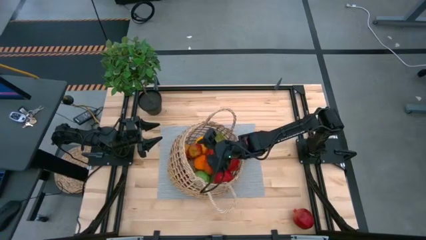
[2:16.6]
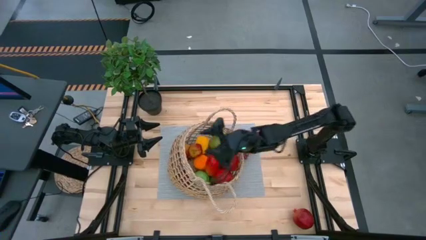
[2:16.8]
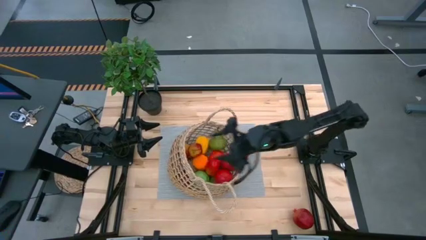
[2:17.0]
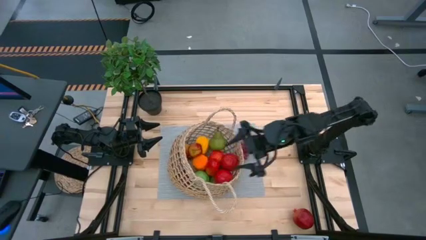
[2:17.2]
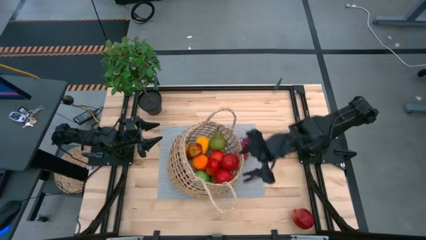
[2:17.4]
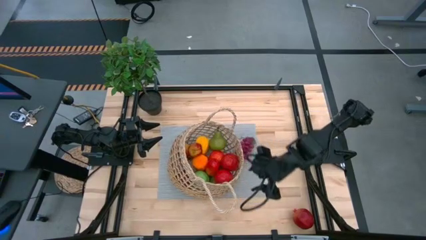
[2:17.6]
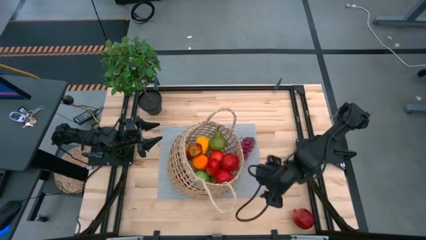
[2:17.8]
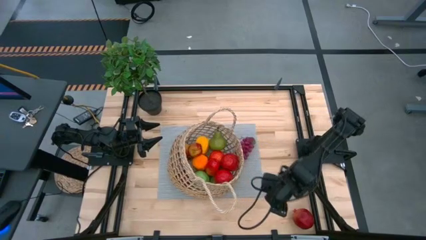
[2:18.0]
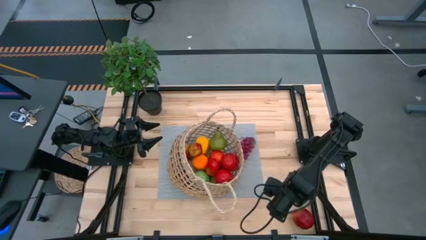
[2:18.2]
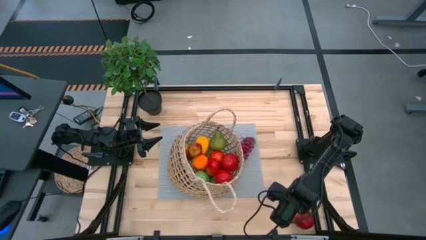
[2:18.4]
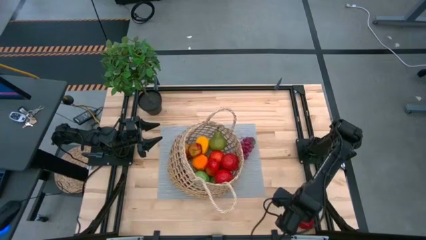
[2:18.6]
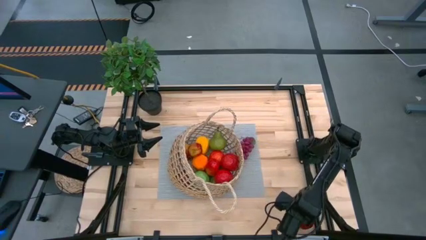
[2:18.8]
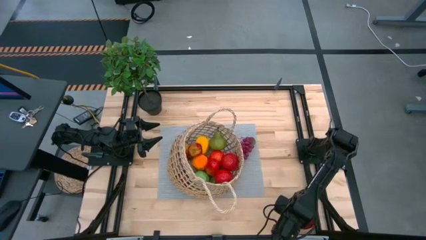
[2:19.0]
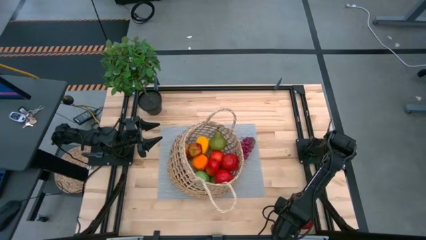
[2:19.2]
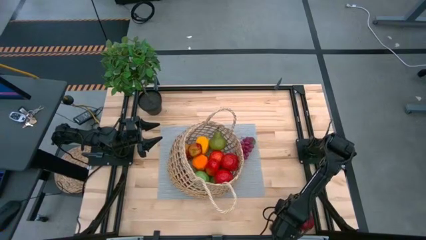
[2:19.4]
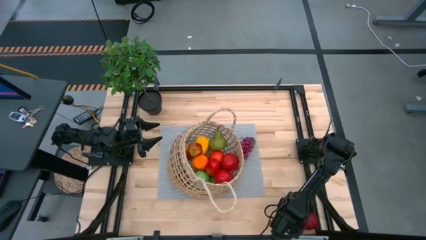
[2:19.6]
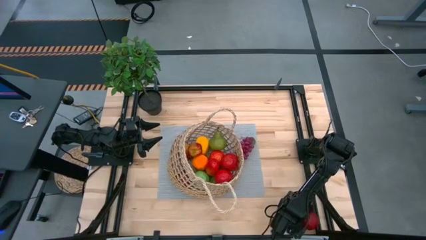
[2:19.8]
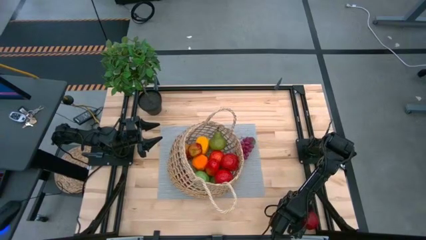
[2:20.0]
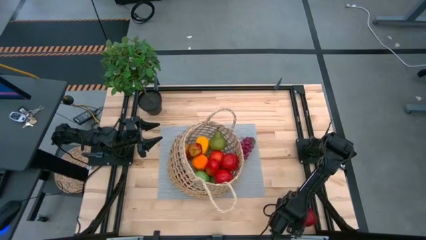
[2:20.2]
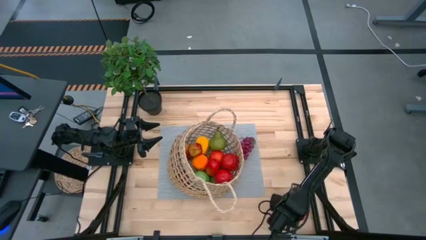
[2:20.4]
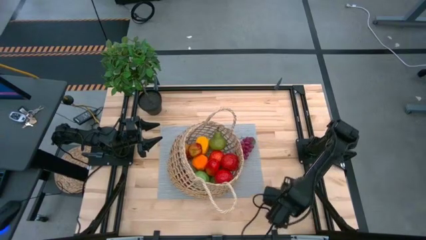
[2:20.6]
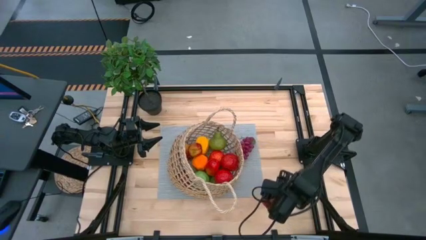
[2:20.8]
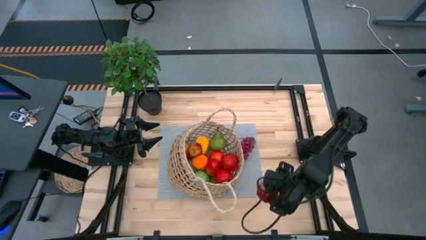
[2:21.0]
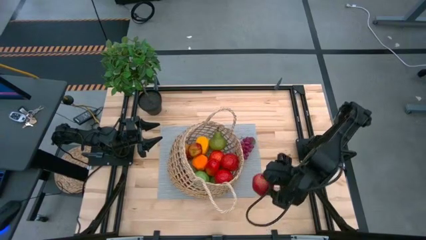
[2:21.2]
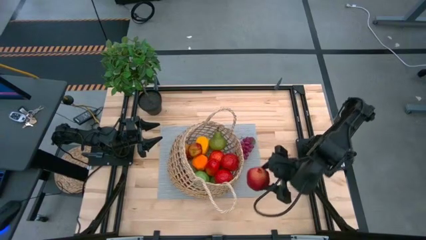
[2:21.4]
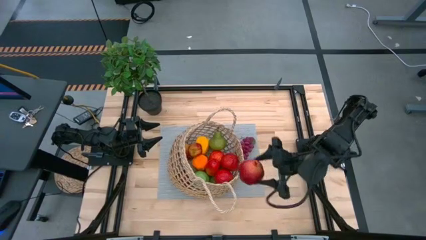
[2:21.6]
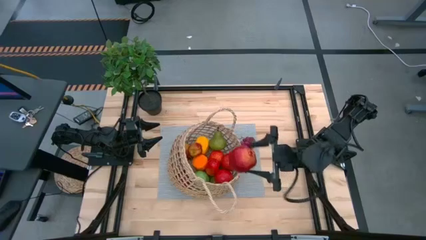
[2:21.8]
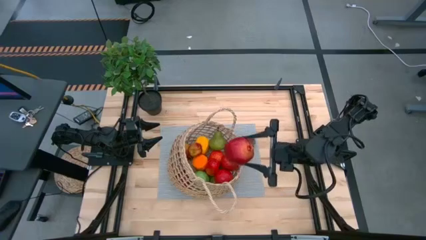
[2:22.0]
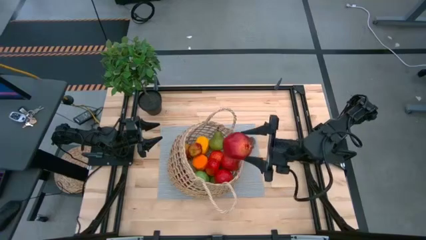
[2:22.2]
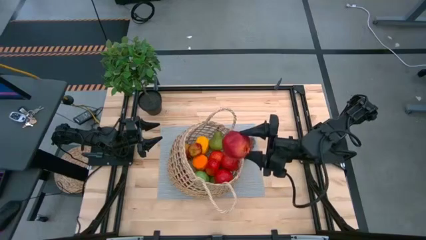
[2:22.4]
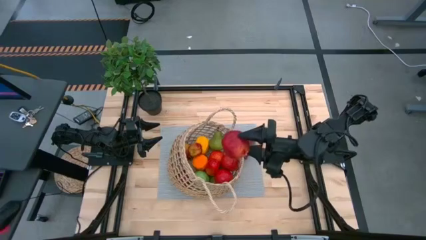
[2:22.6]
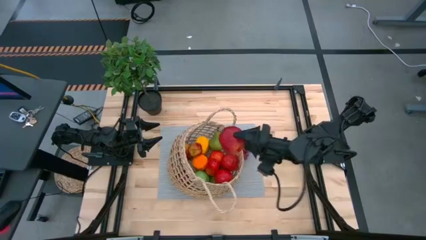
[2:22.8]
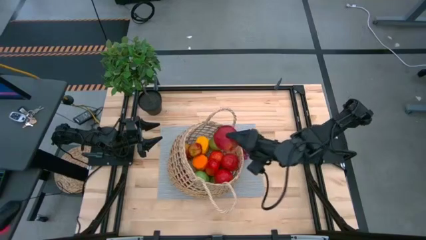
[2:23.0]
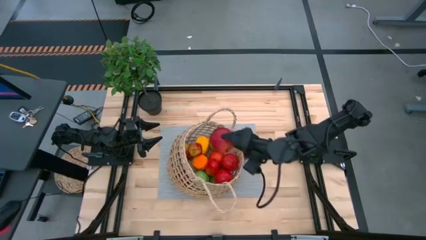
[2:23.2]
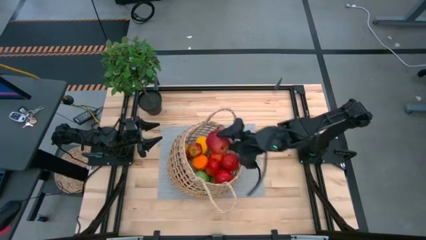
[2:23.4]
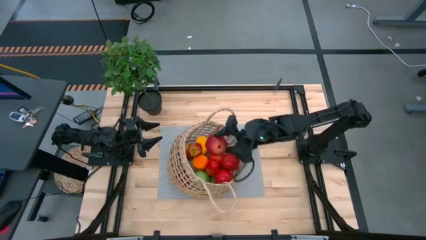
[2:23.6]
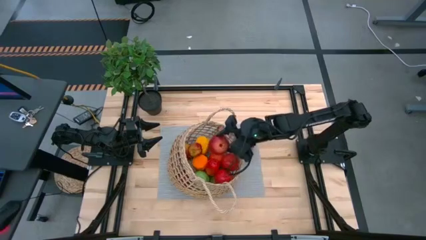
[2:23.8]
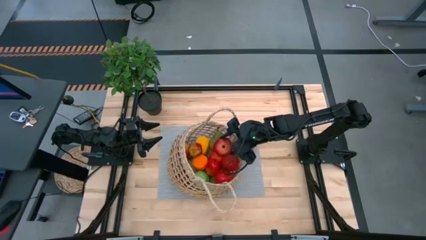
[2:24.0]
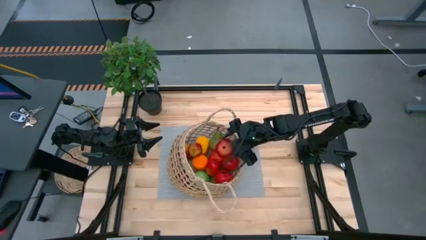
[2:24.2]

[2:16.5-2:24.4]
Task: Build produce basket
Put the red pomegranate into the brown basket

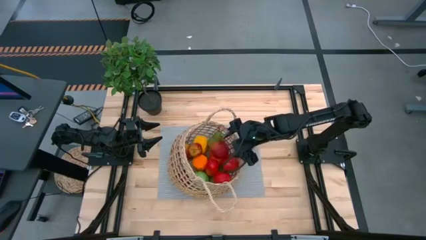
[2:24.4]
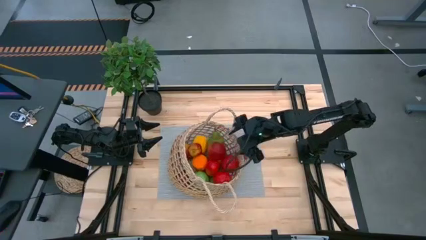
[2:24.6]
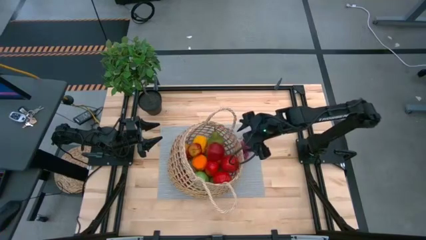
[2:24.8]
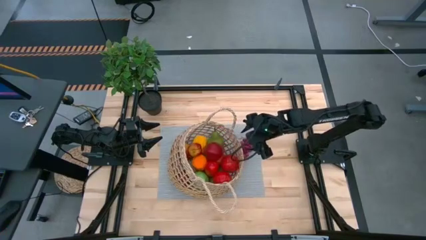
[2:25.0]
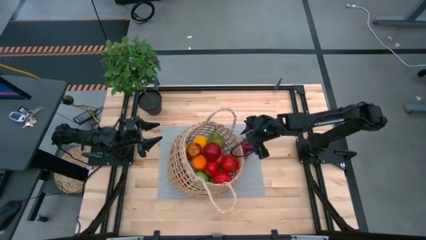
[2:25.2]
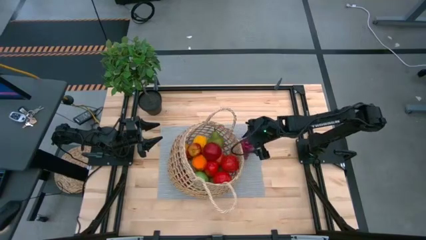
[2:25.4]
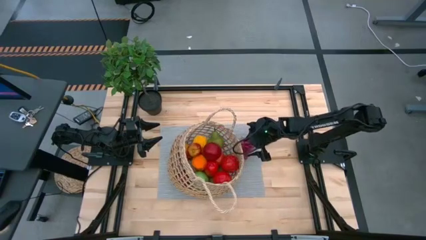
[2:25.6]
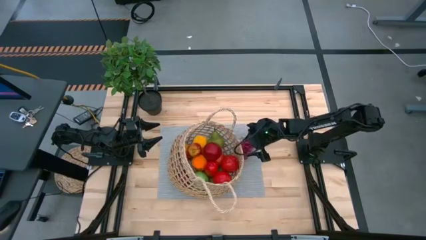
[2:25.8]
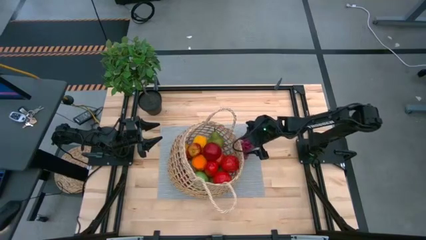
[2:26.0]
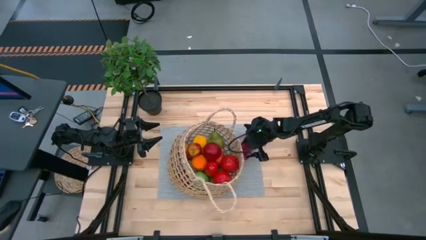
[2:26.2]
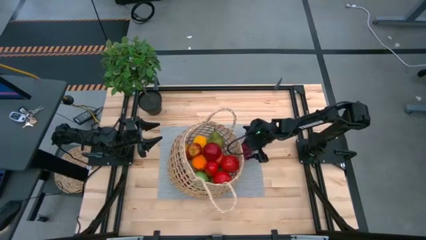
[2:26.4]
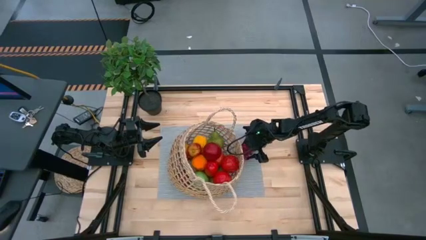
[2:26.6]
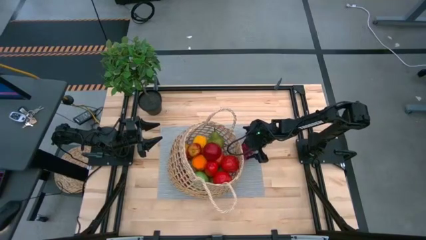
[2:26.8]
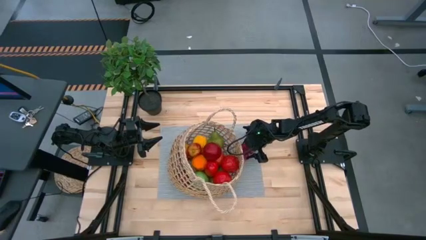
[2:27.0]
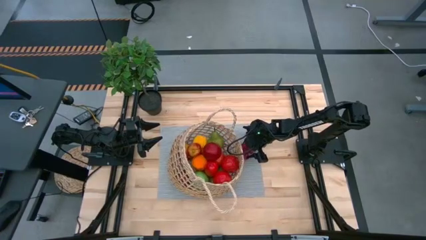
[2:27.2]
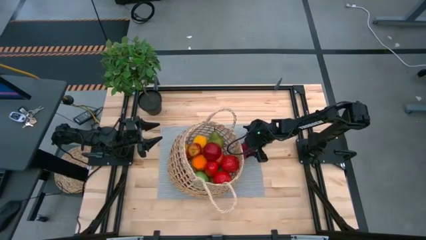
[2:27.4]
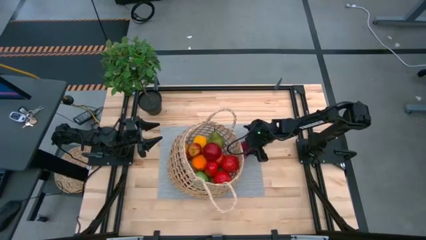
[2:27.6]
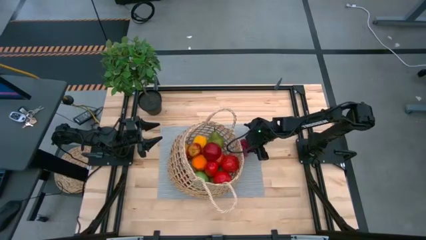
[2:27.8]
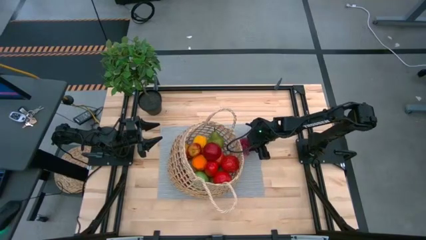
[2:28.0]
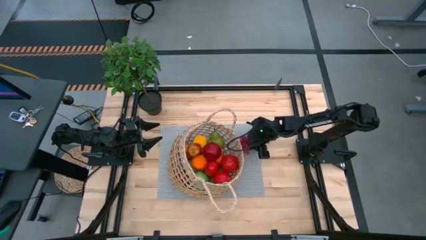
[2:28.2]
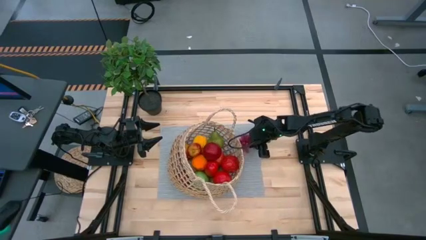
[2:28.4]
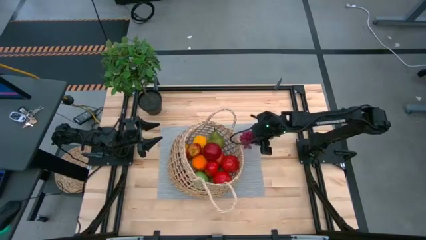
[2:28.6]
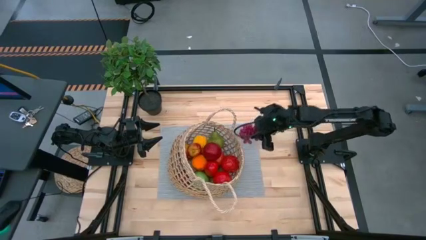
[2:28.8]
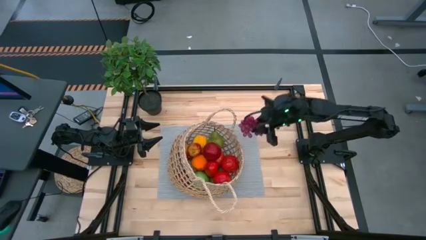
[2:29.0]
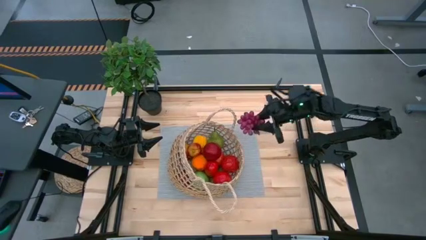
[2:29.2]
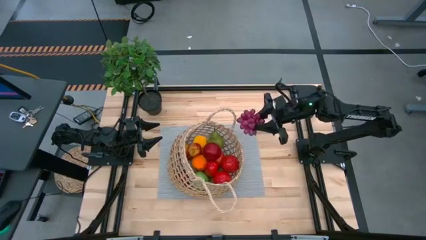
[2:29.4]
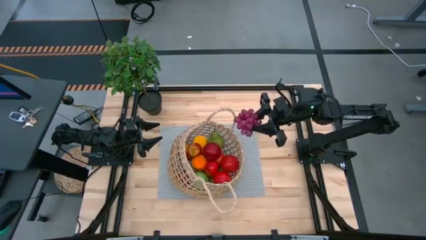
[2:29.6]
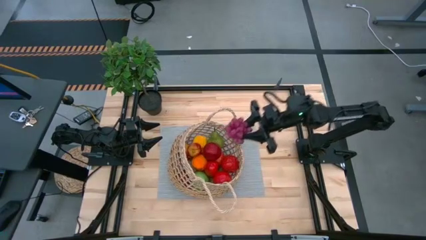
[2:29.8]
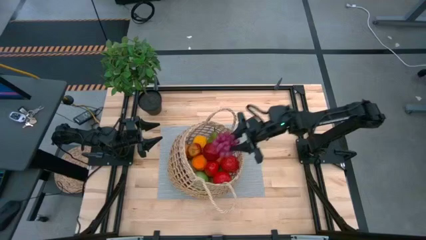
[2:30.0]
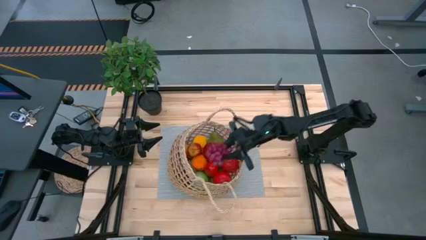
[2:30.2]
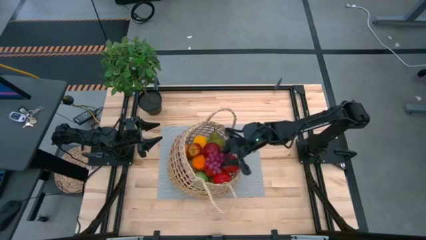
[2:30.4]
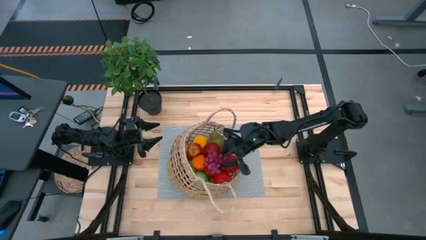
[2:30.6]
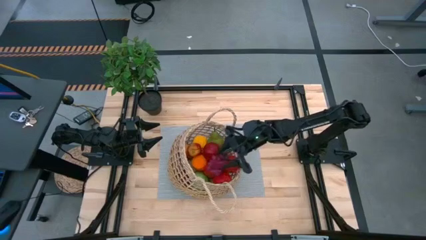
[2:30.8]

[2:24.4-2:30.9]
Put the purple grapes into the brown basket

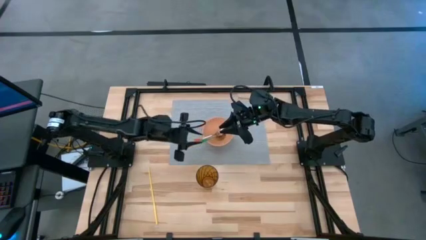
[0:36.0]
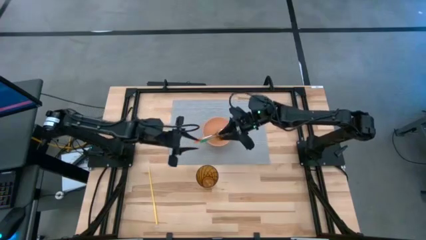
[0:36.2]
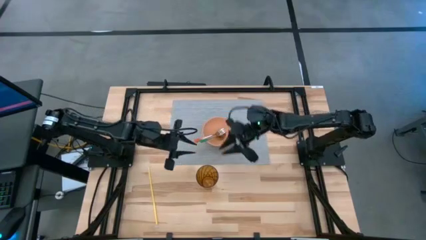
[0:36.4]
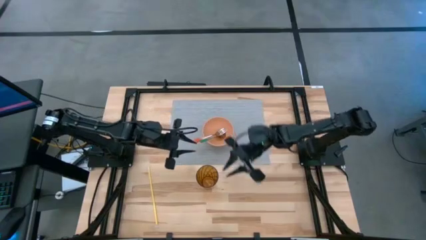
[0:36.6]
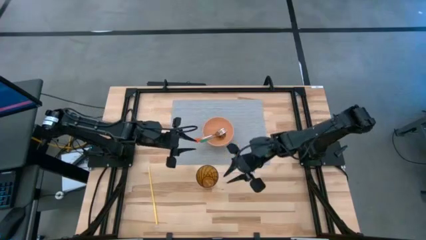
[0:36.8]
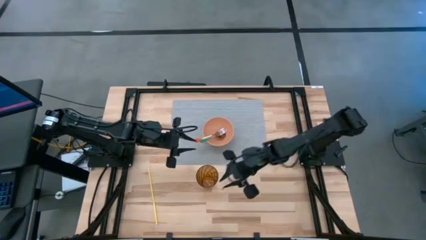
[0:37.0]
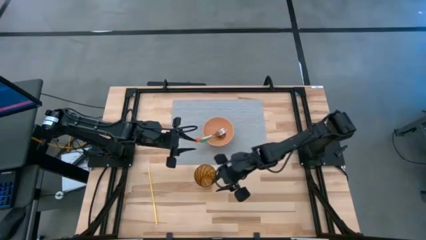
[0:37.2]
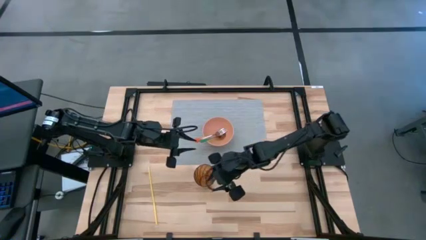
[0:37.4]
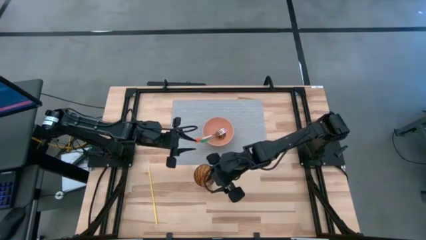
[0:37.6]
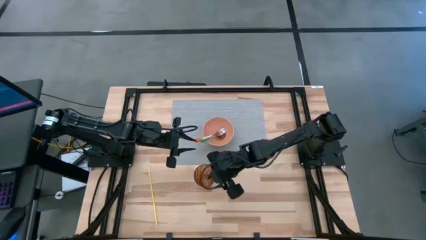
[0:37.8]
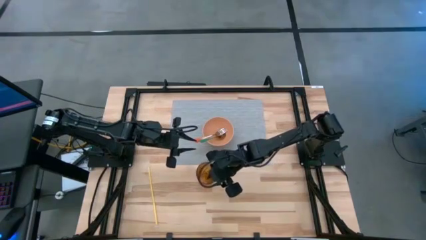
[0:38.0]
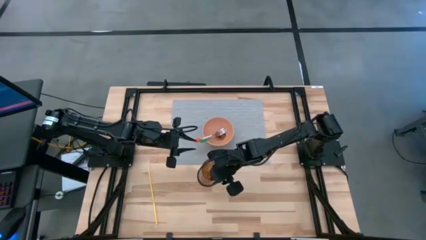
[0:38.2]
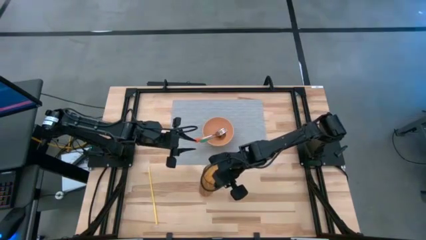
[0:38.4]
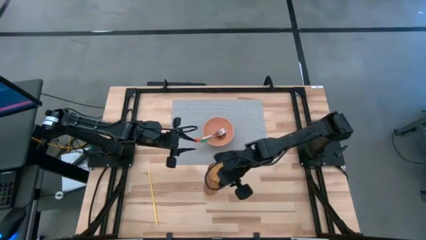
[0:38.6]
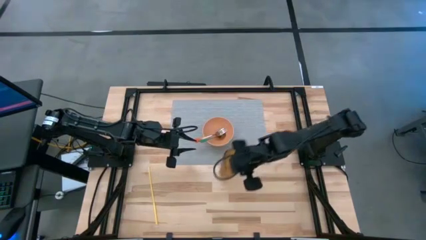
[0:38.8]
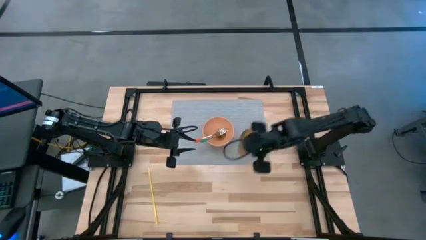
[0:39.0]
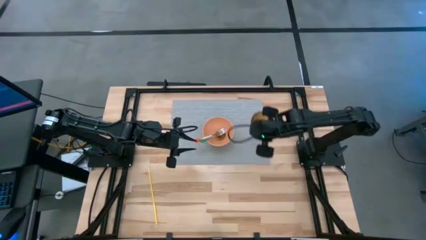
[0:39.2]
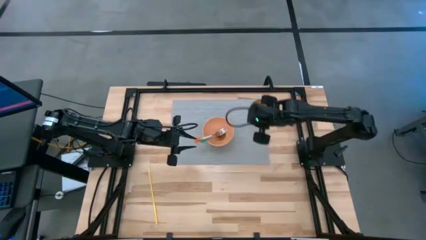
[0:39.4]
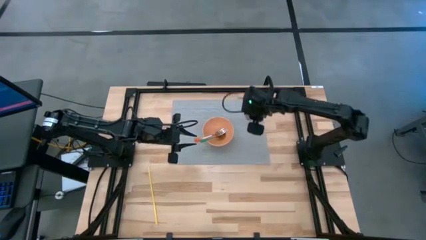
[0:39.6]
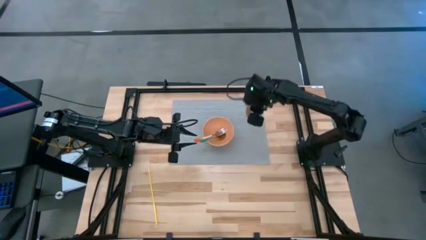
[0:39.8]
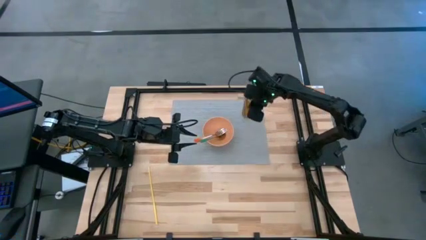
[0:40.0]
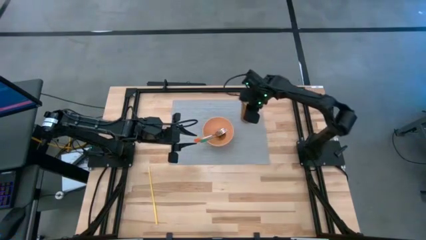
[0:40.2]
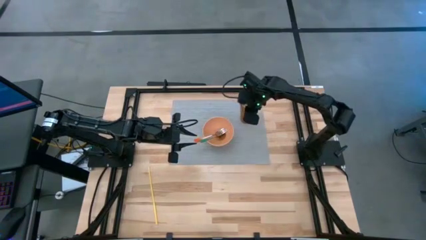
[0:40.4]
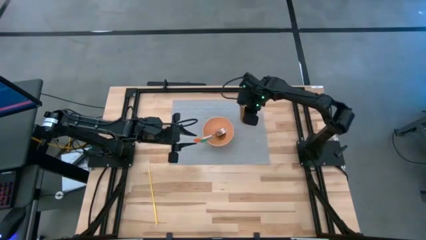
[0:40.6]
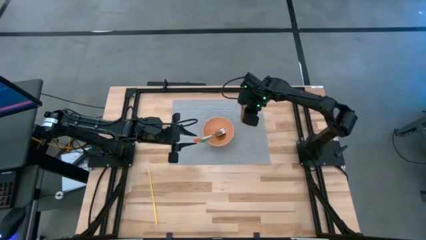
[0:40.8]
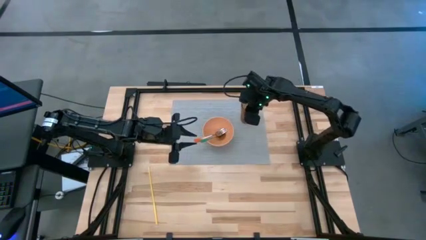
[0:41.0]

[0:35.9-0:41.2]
Task: Pick & Place Utensil
Put the brown cup to the top right of the light orange bowl on the gray placemat
